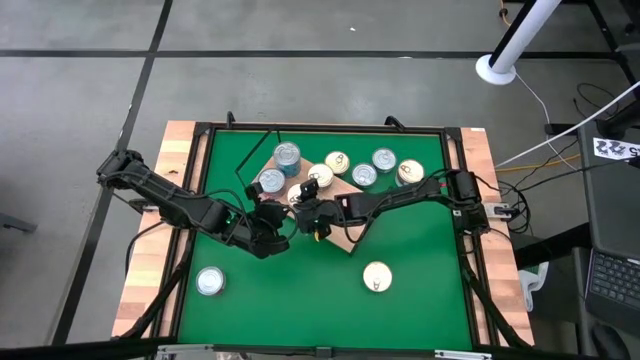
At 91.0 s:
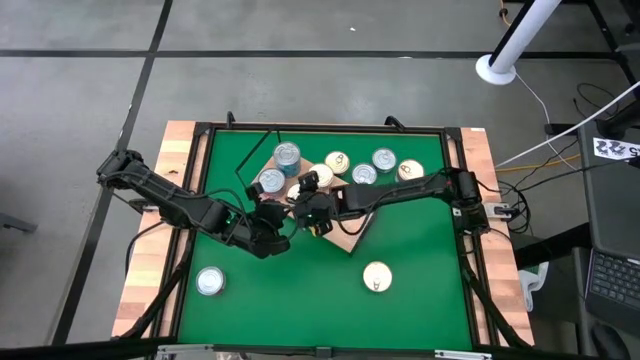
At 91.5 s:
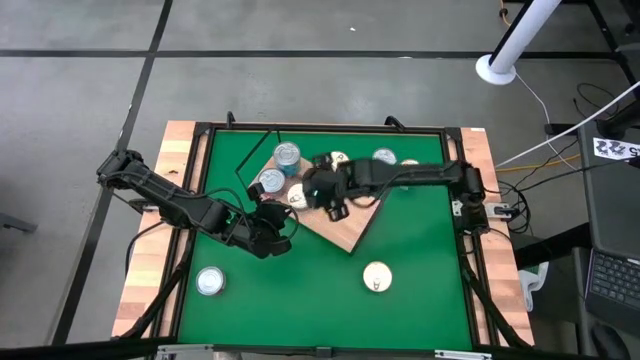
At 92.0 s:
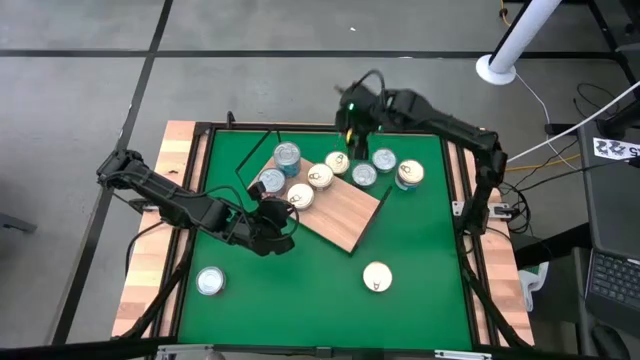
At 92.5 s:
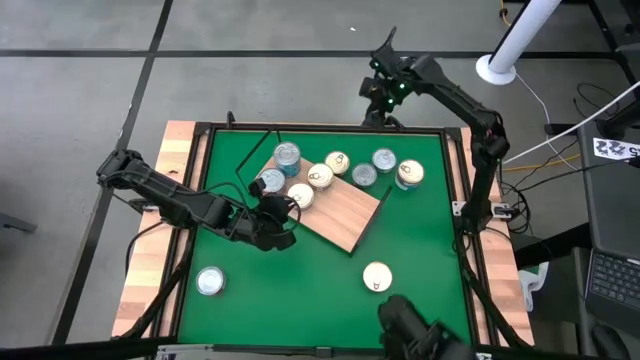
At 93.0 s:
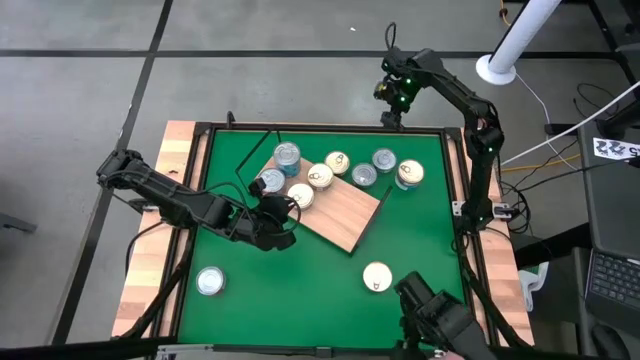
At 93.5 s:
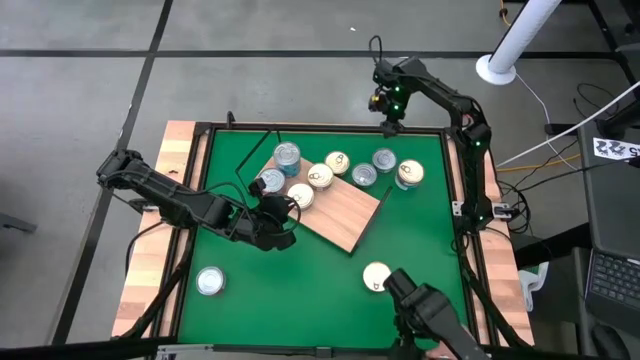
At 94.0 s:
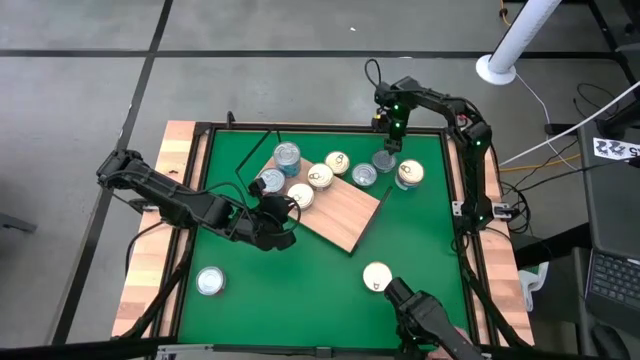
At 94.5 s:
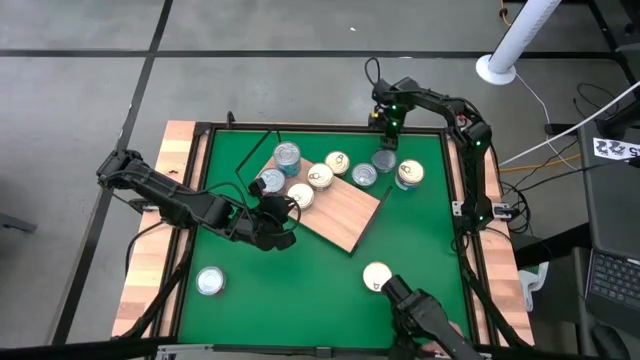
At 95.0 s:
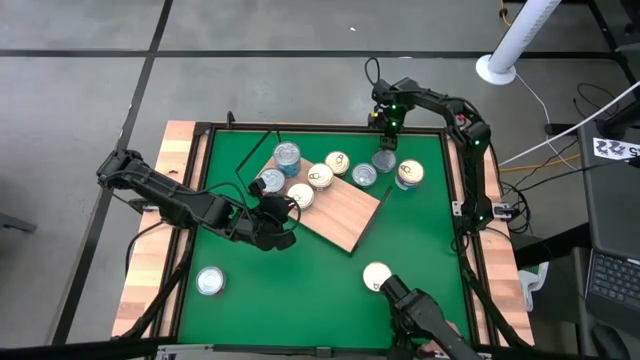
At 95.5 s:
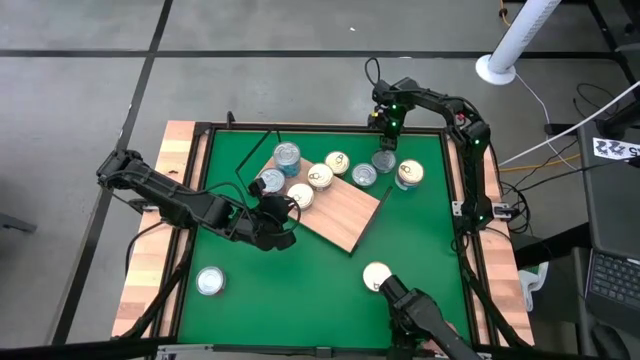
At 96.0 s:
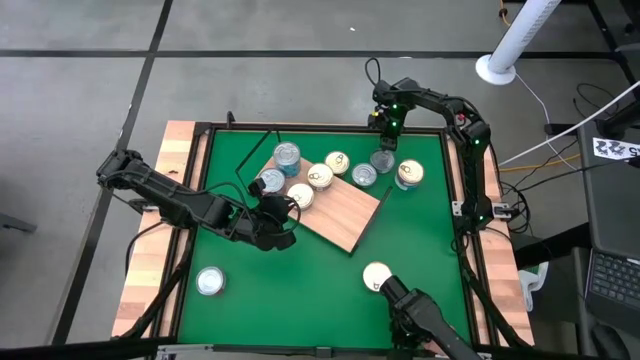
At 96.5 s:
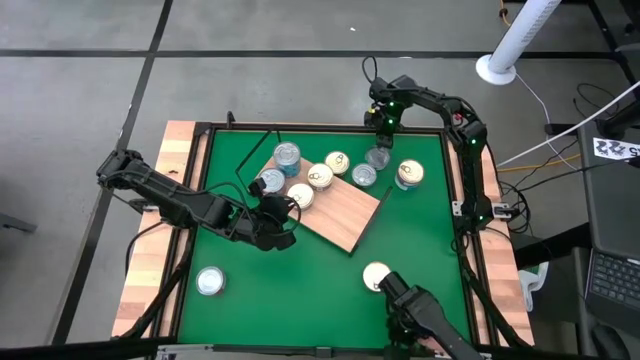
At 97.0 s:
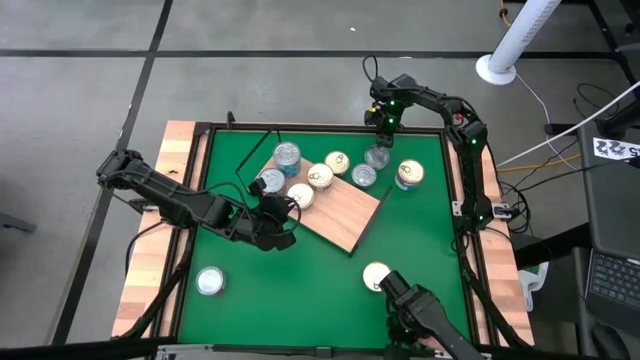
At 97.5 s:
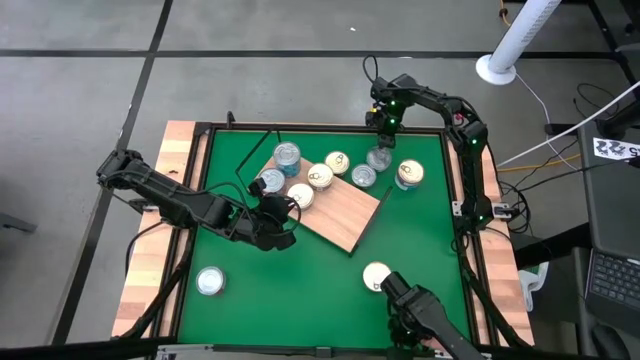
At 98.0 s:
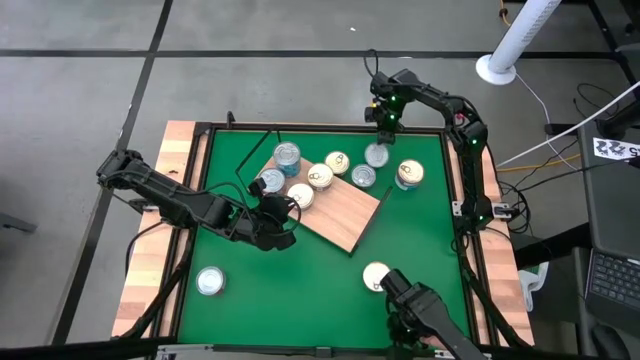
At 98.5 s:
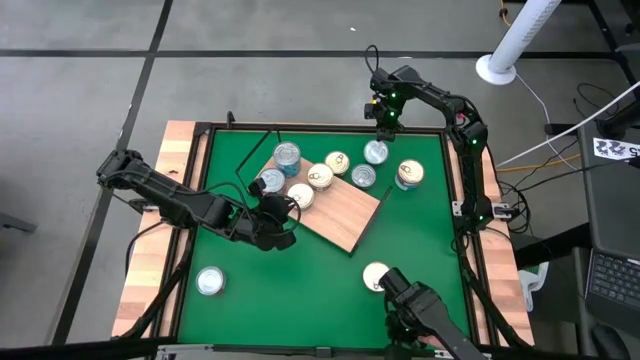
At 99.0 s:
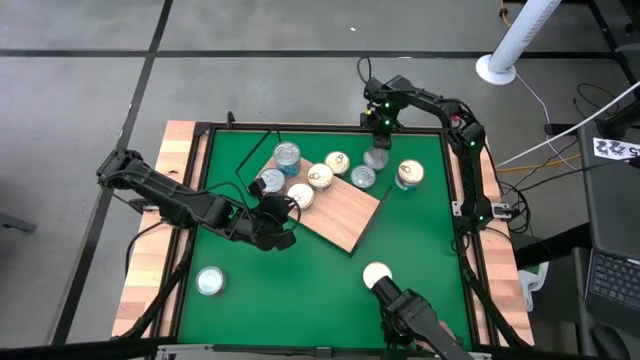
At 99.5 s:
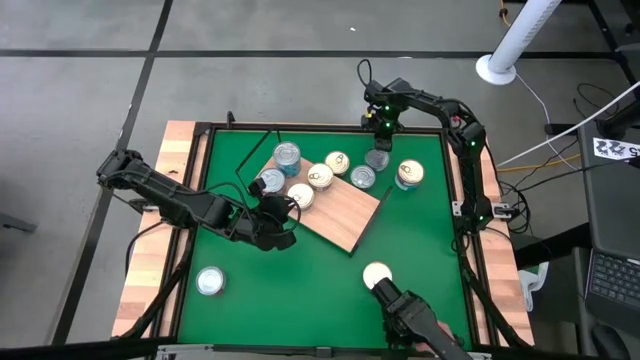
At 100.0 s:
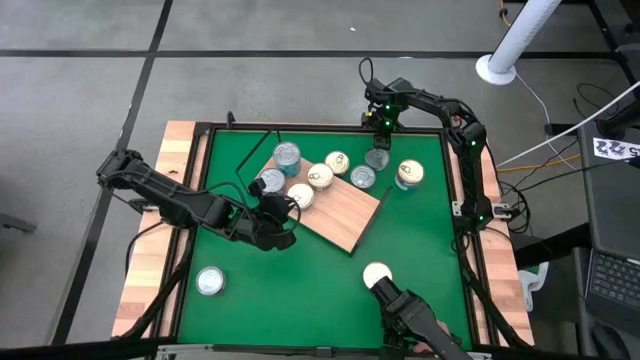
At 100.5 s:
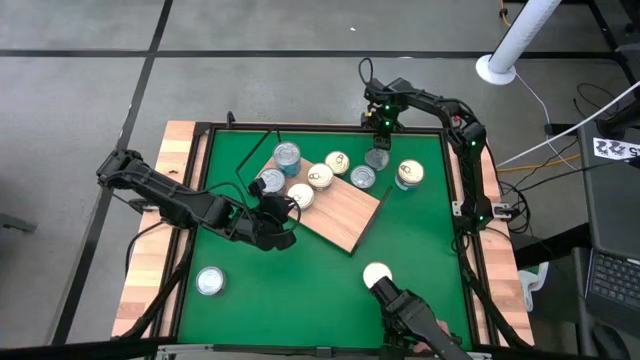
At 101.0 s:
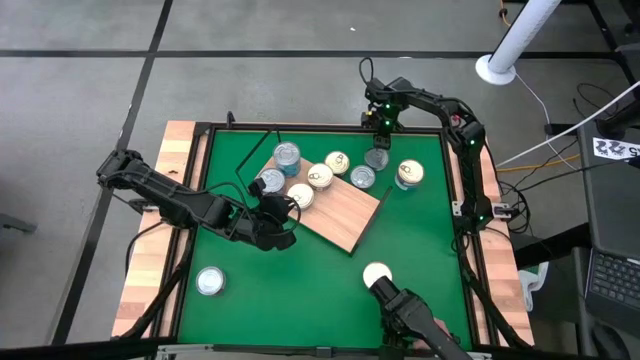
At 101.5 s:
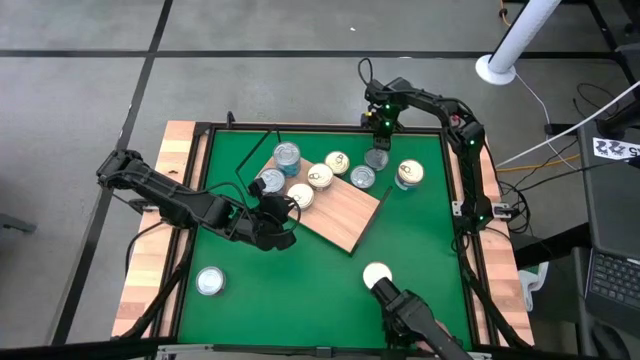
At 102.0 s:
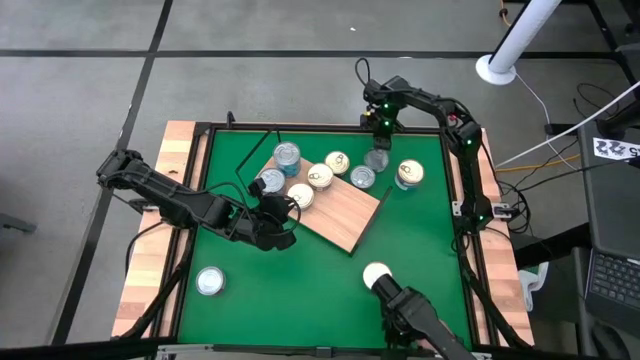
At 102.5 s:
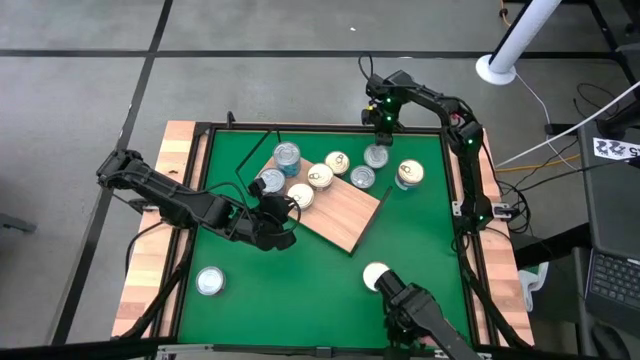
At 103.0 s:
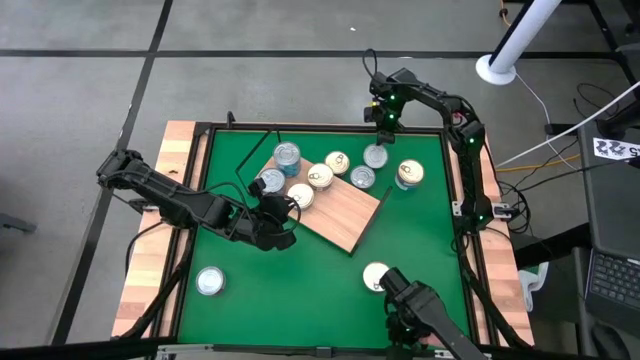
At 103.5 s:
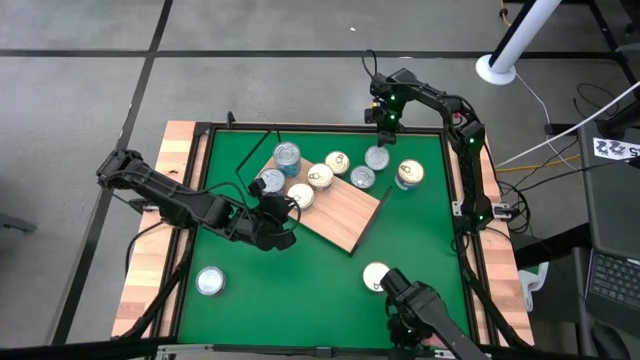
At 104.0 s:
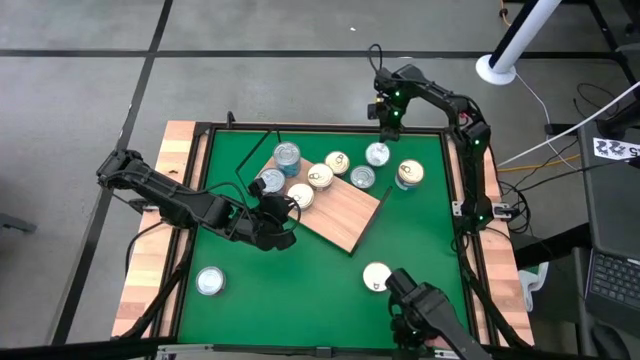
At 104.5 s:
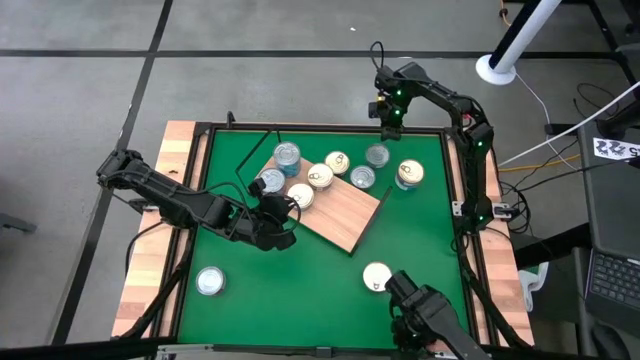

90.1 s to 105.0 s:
Task: Stack canned seafood by type on shelf
Put the green can on the shelf

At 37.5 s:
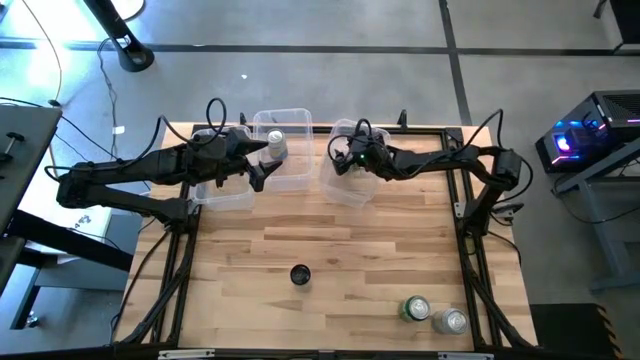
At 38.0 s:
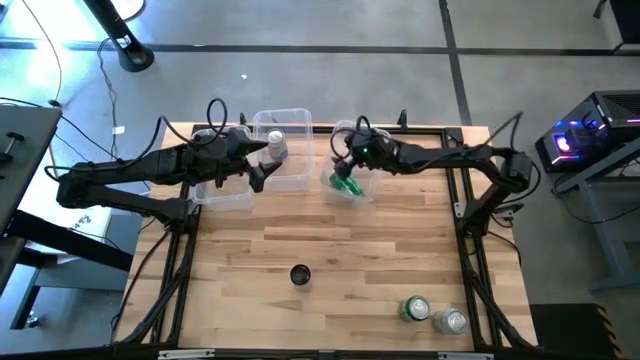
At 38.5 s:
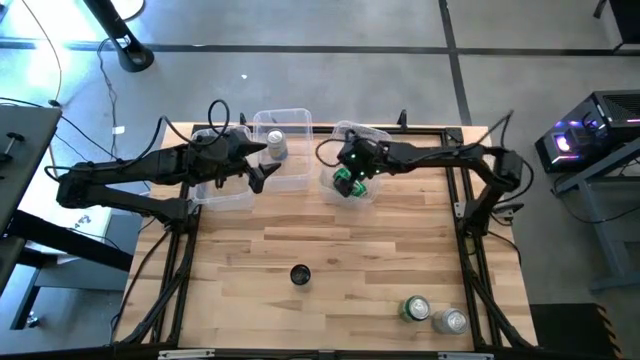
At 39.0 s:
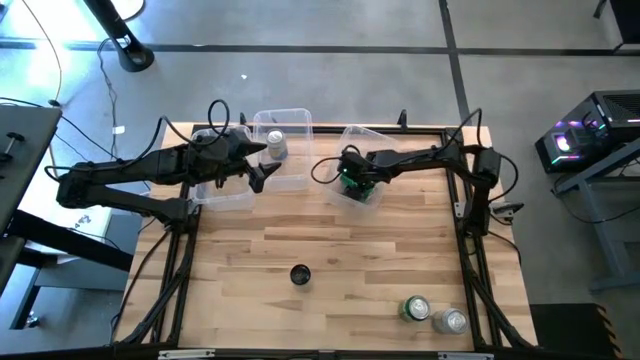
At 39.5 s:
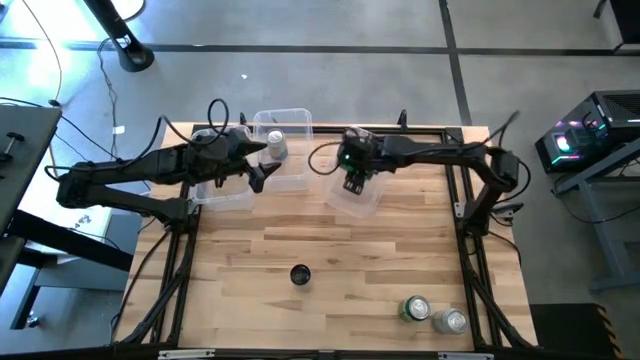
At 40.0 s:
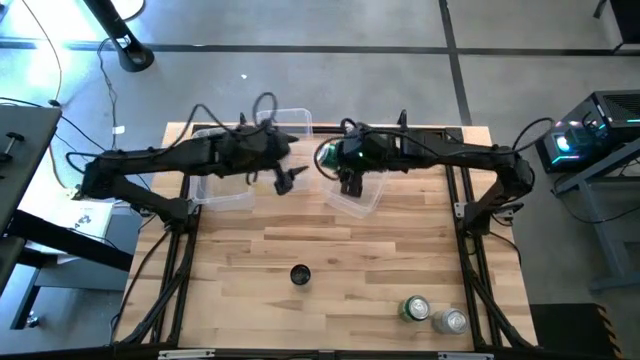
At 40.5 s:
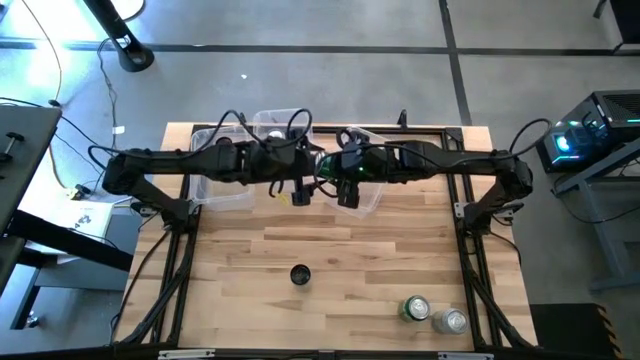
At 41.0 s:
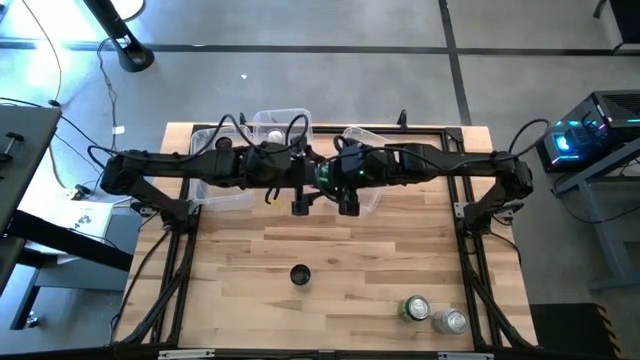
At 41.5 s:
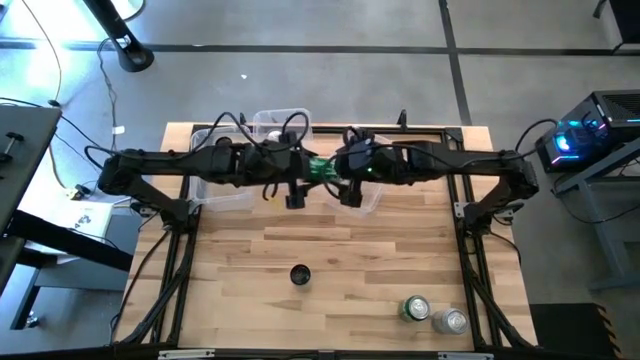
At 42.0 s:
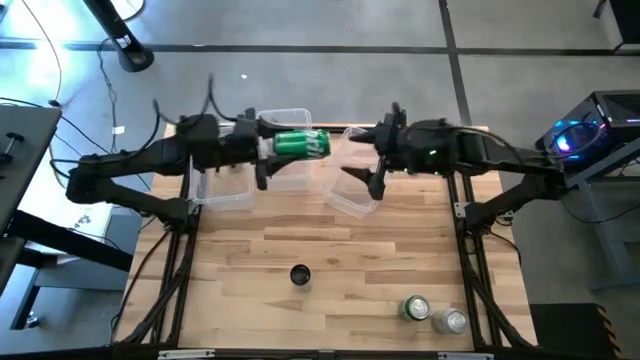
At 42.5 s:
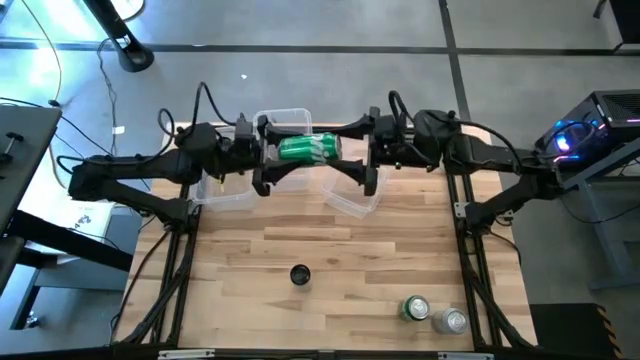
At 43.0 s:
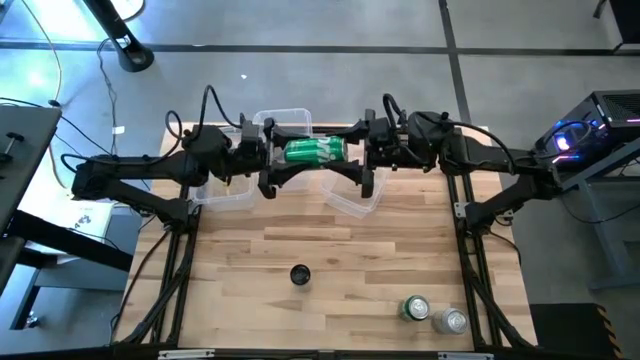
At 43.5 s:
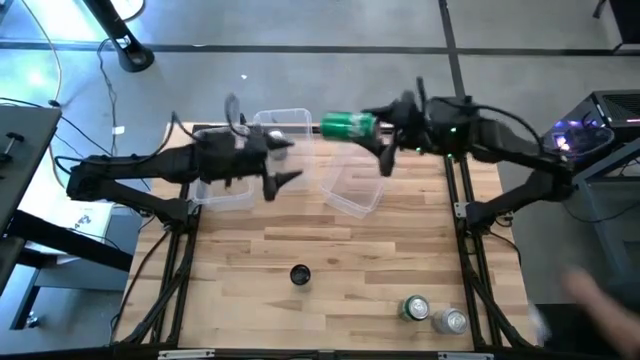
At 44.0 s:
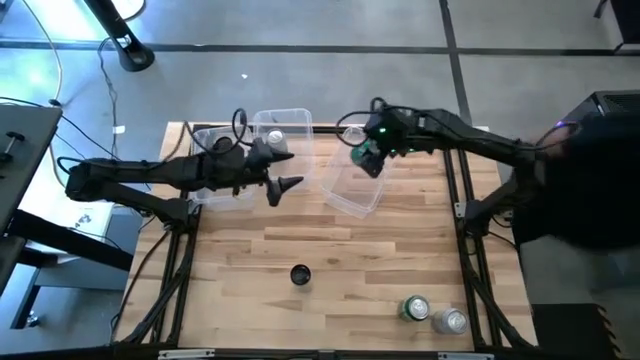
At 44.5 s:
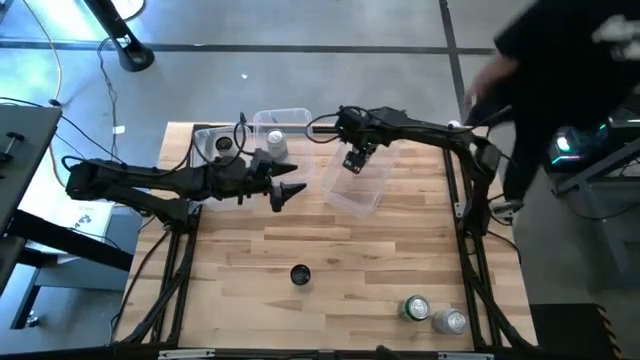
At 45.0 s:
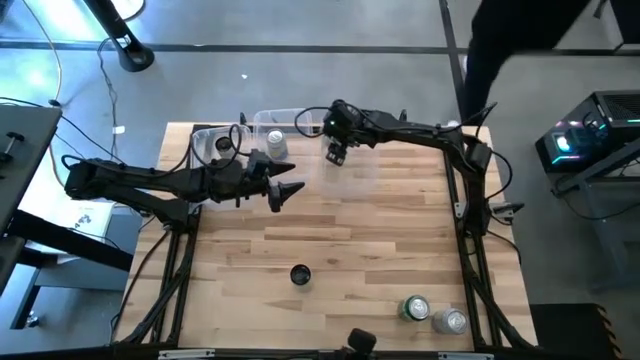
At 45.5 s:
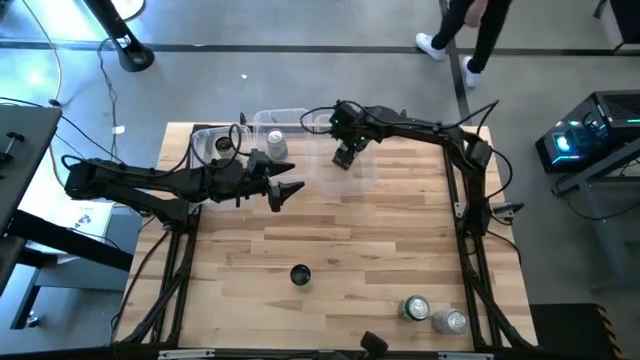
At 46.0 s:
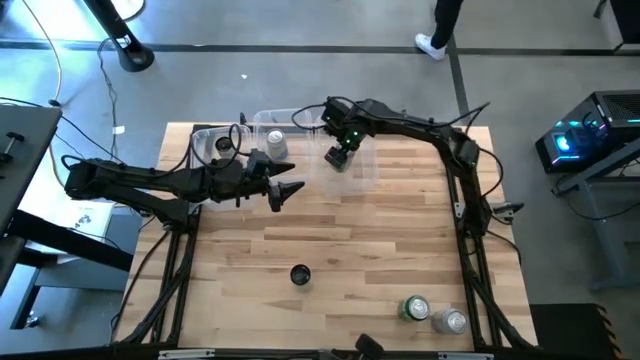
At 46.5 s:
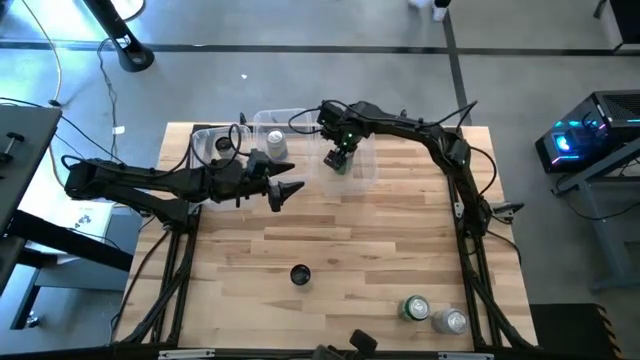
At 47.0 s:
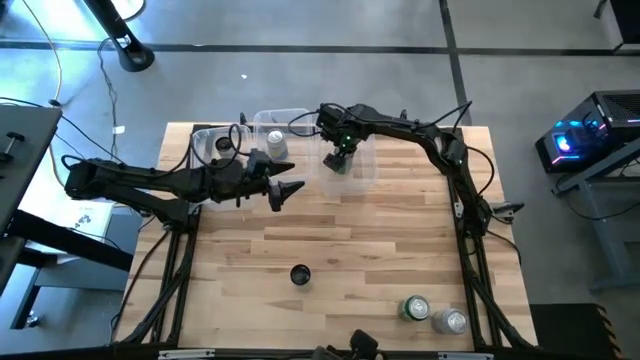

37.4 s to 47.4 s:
Task: Sort soda cans
Put the left green soda can into the right transparent bin
